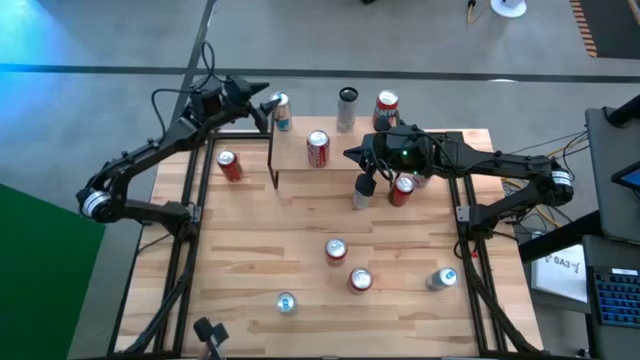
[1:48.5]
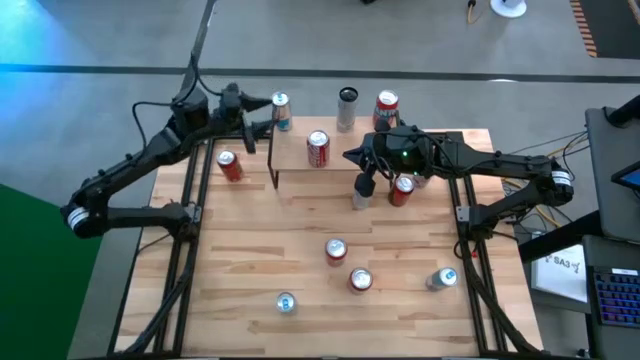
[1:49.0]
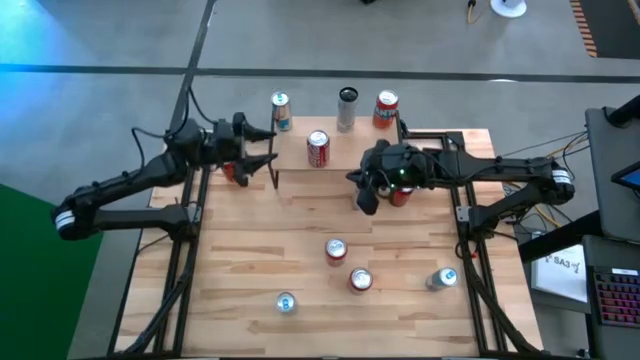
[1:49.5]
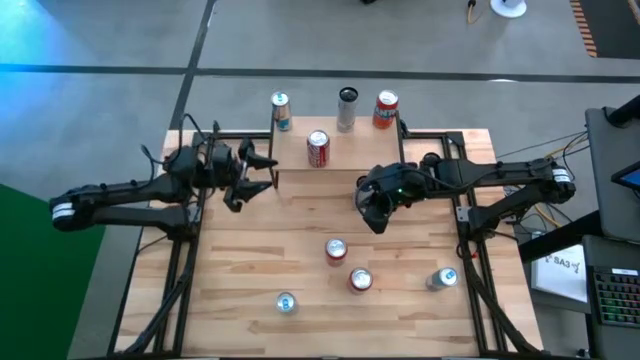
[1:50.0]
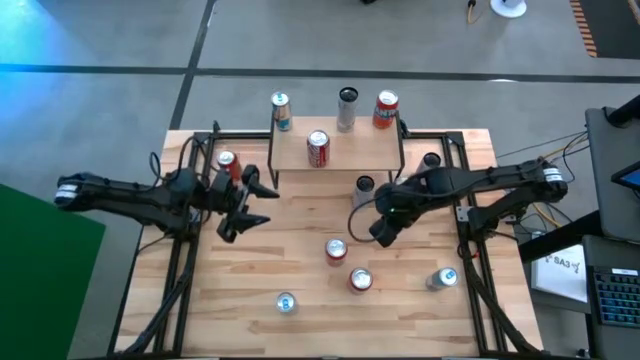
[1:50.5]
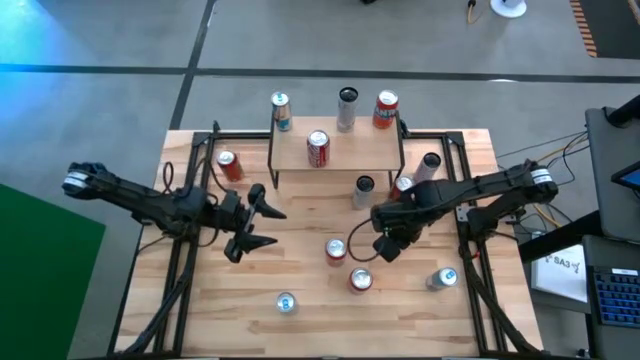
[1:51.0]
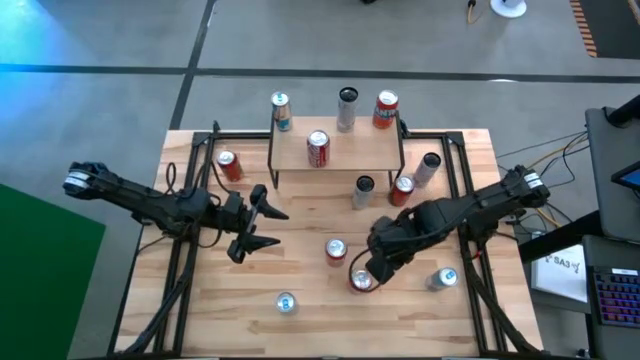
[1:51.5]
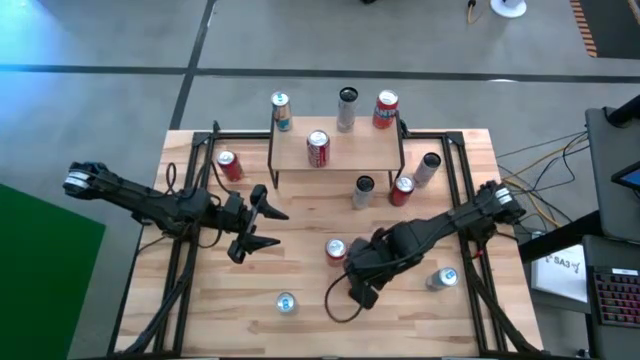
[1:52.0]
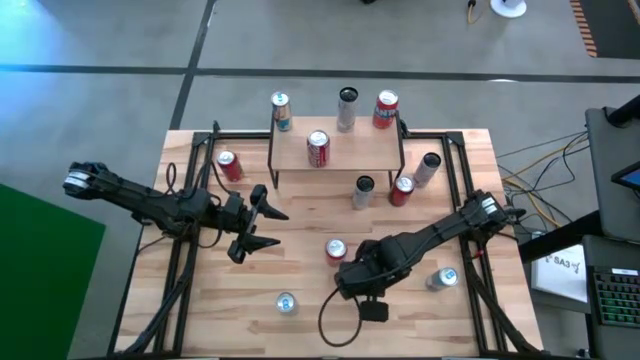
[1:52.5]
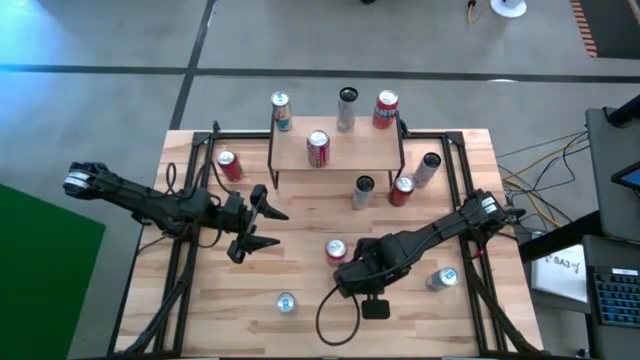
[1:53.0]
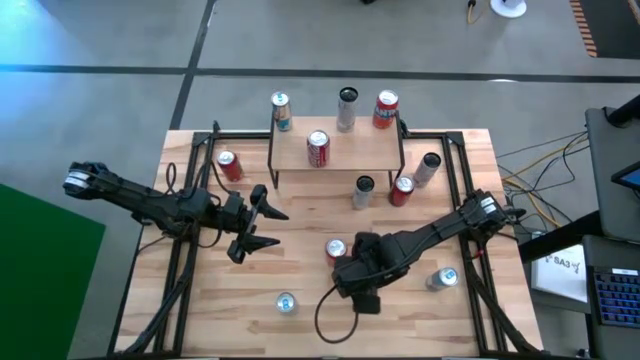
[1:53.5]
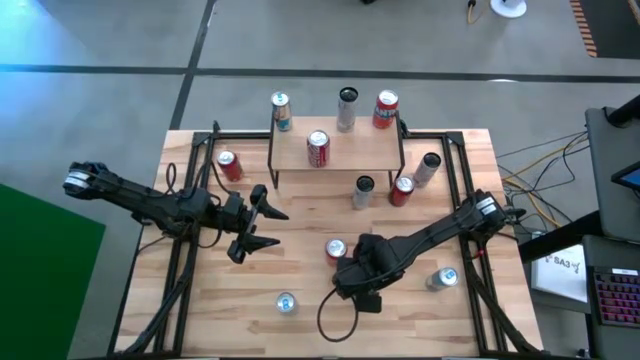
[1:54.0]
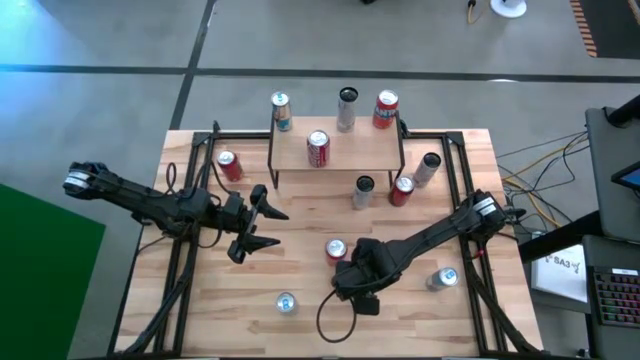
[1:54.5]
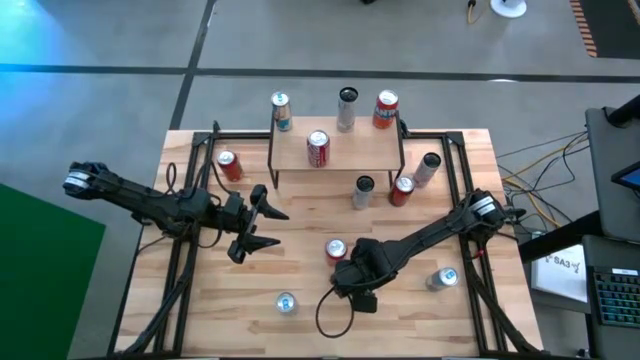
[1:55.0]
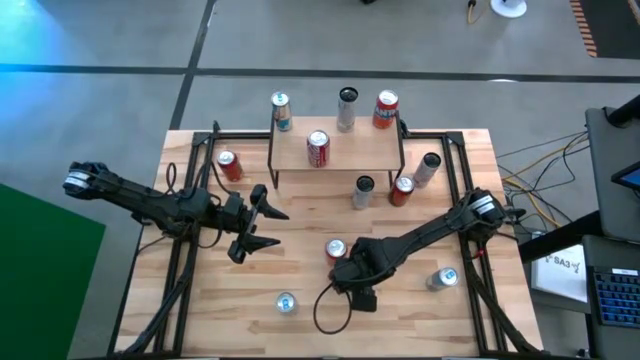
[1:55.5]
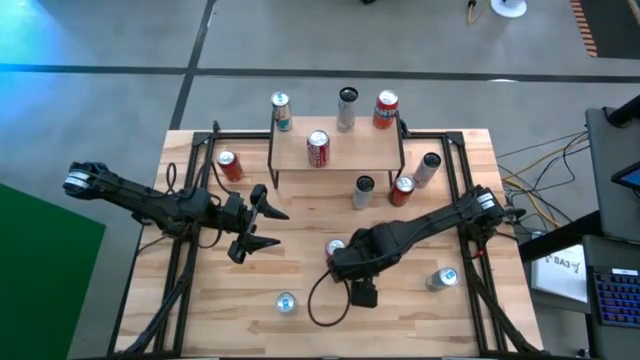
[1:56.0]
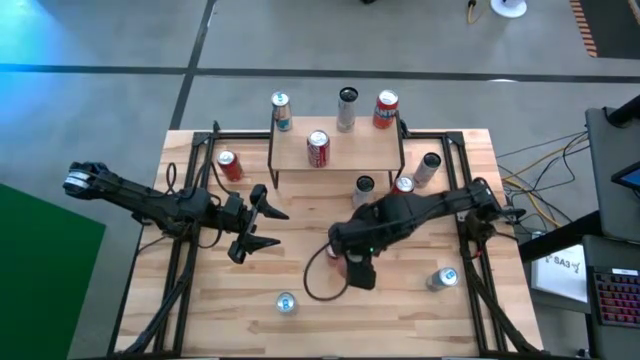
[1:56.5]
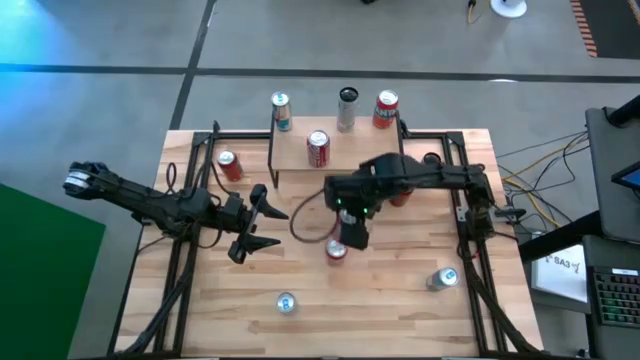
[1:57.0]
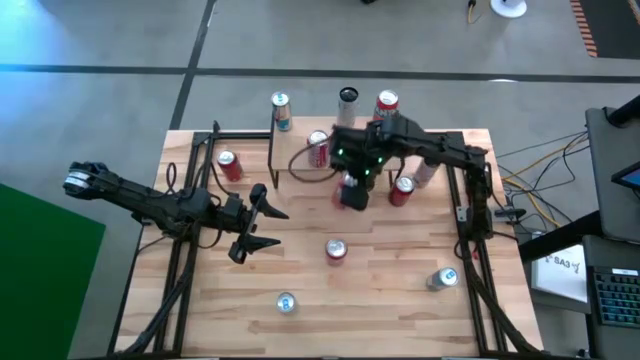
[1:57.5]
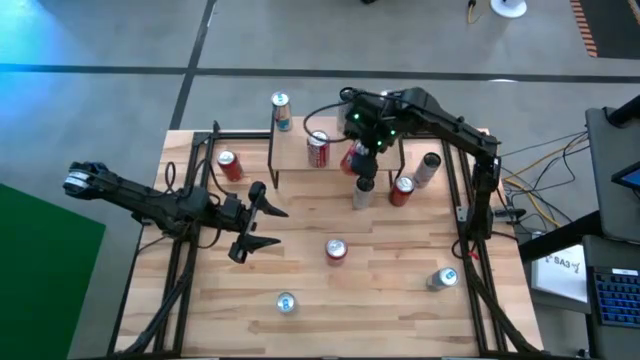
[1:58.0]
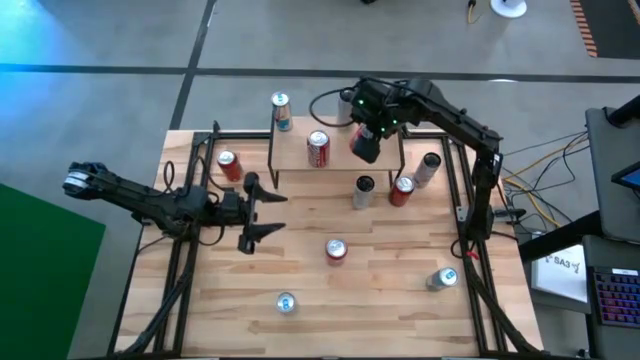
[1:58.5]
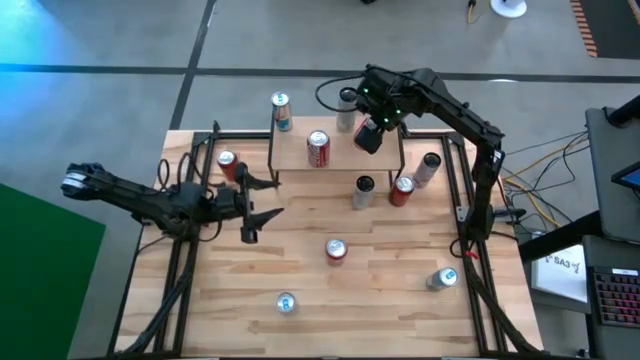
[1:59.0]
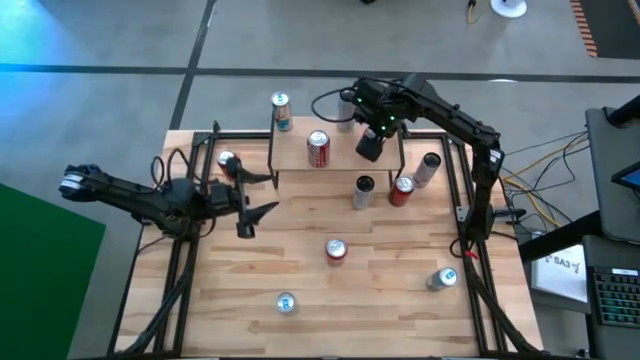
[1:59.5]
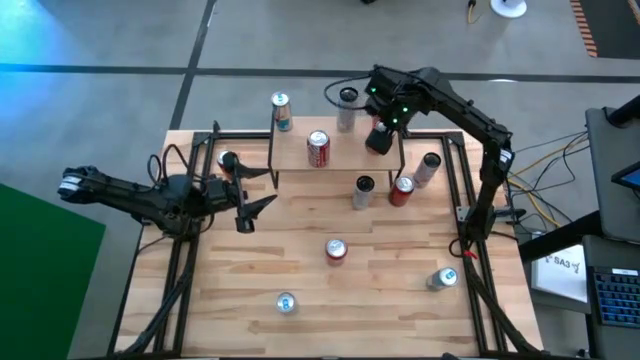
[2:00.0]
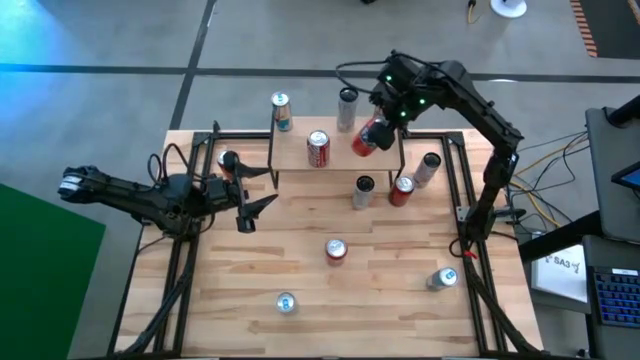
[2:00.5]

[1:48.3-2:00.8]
Task: Place canned beverage on shelf
Put the bottom red soda can on the shelf

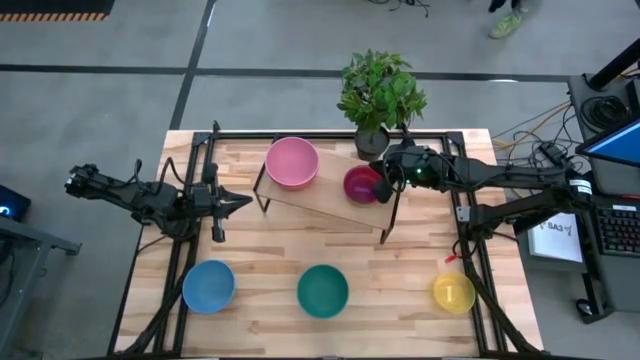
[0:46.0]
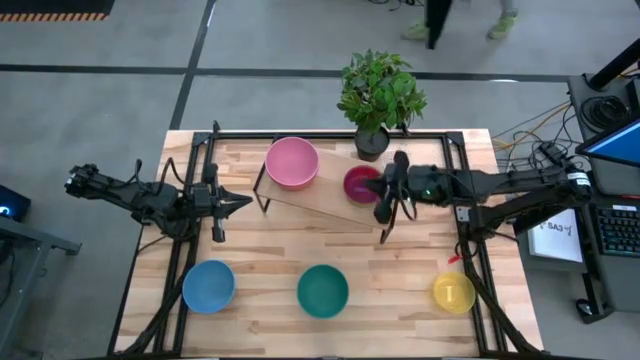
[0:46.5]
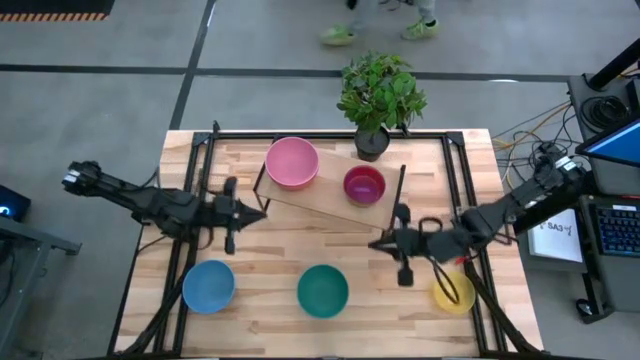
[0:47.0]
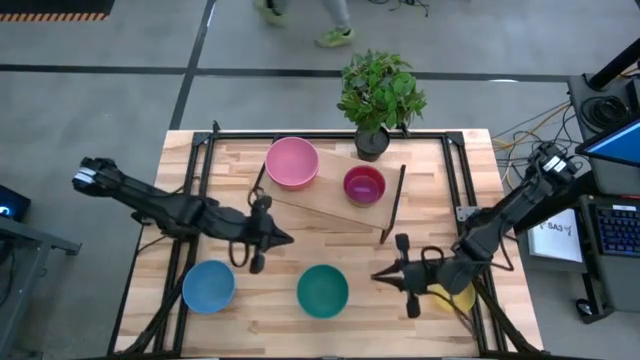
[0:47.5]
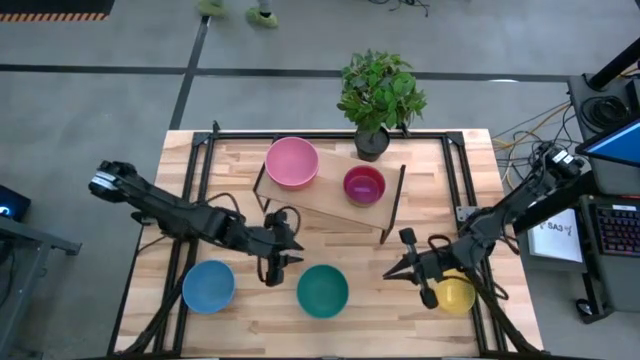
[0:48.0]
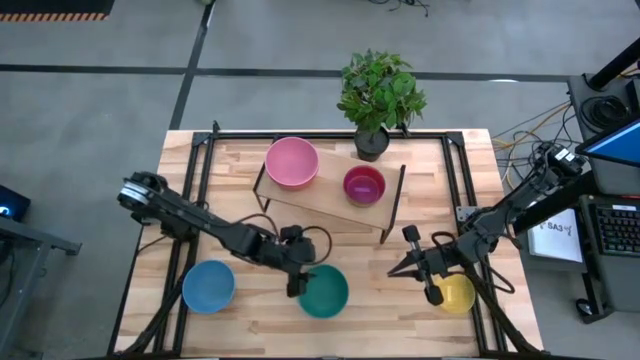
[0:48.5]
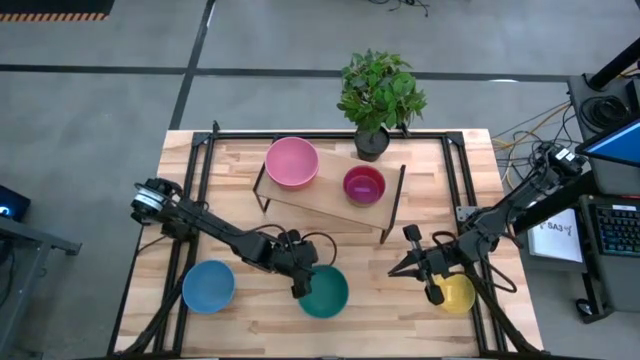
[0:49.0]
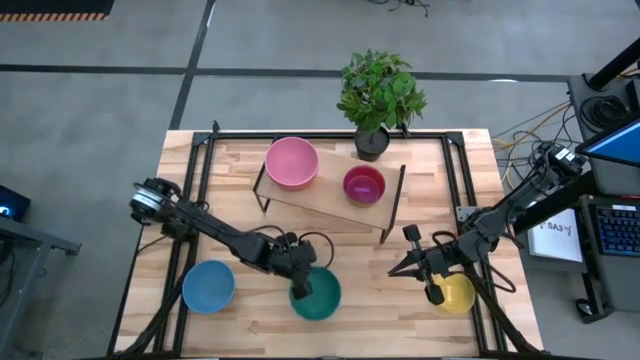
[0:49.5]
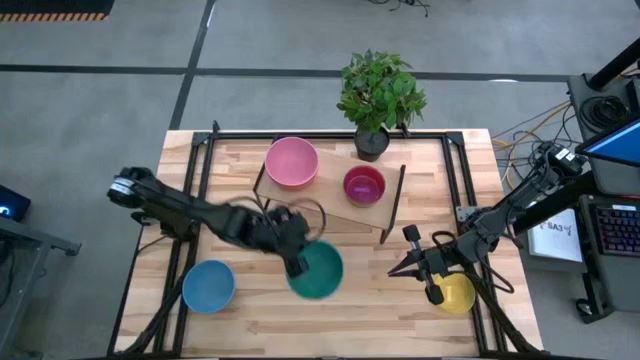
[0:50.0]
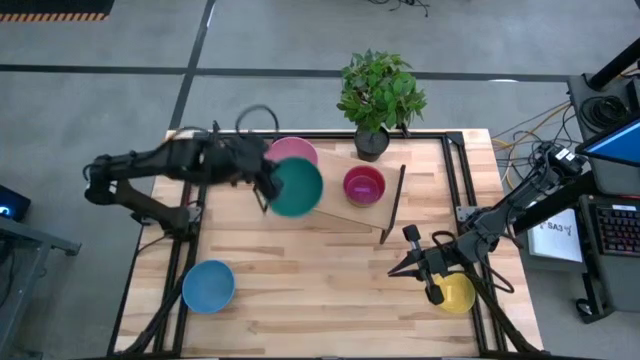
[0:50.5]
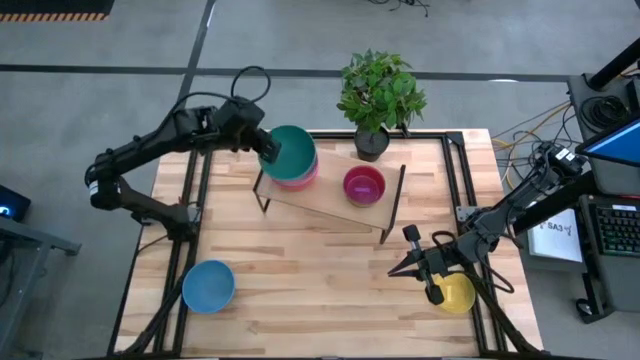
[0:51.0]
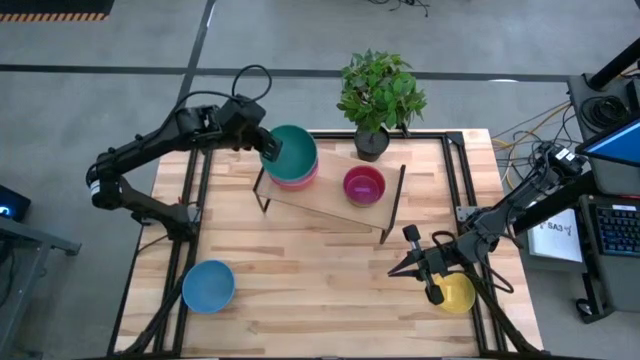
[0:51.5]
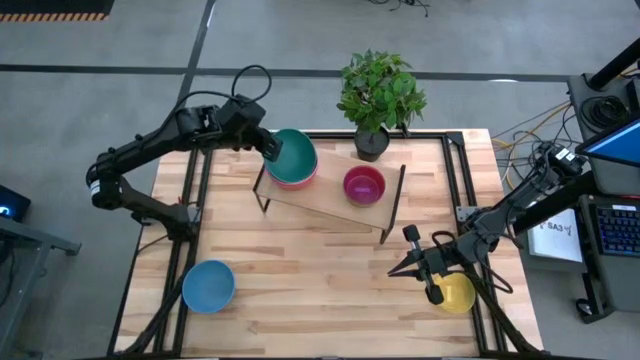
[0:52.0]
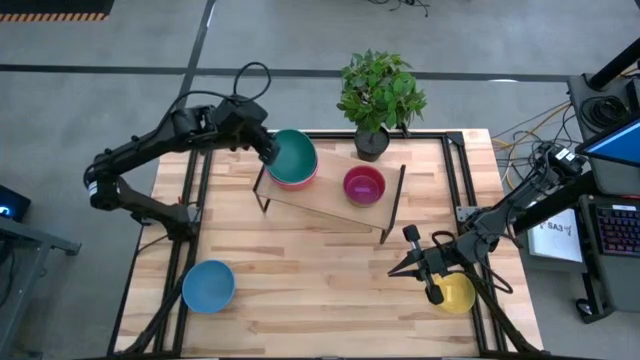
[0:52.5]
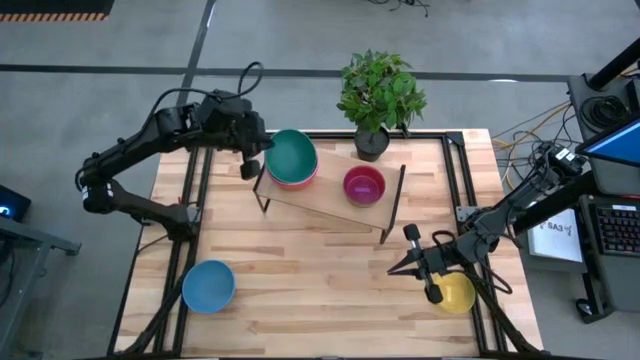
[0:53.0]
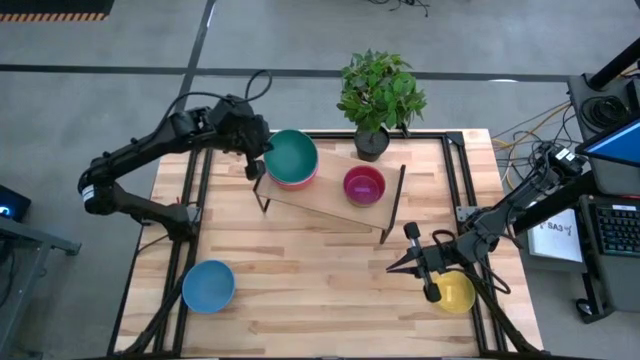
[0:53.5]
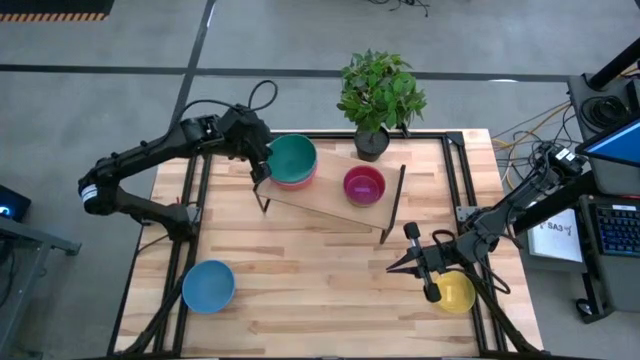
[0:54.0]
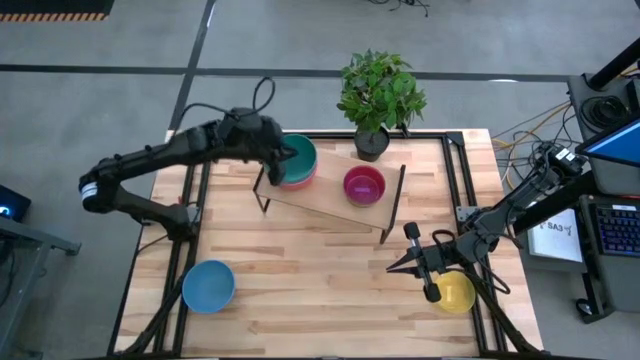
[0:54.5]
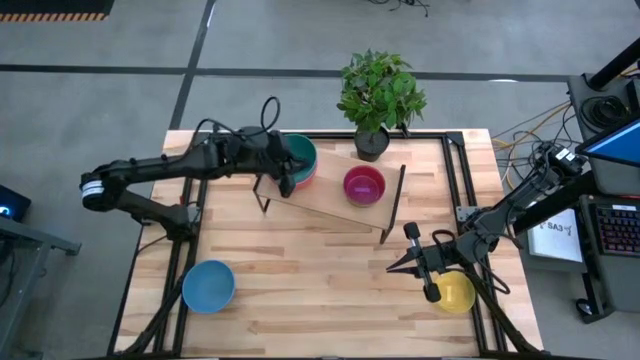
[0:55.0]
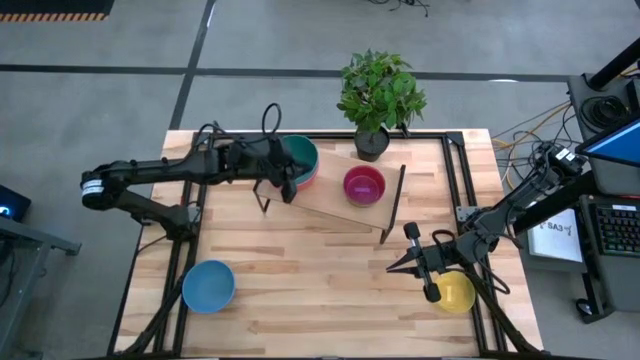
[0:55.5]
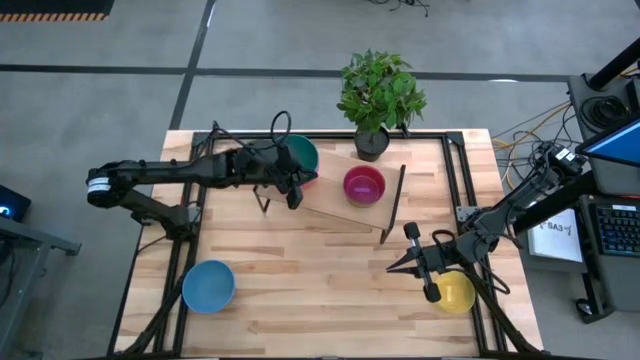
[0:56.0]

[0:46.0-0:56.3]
Task: Place and stack bowls onto a shelf
Stack the light blue bowl on top of the pink bowl on the shelf
